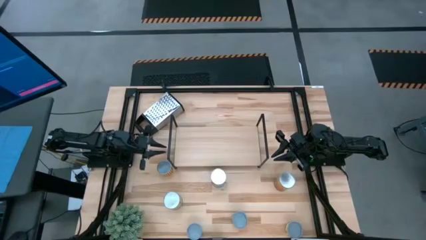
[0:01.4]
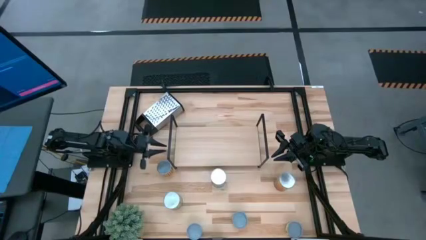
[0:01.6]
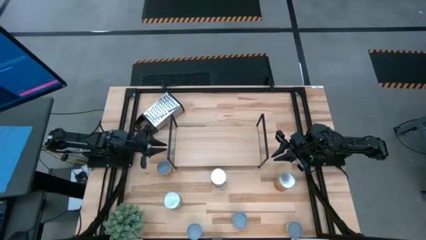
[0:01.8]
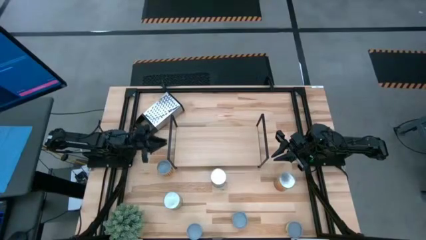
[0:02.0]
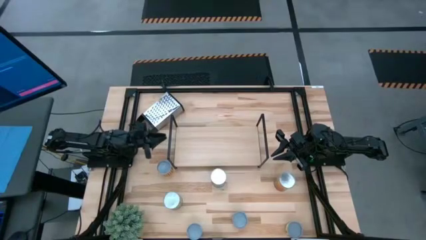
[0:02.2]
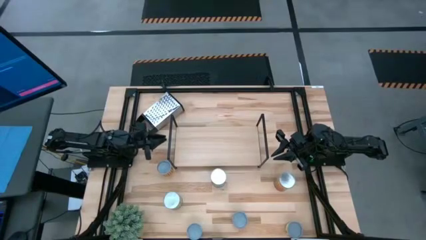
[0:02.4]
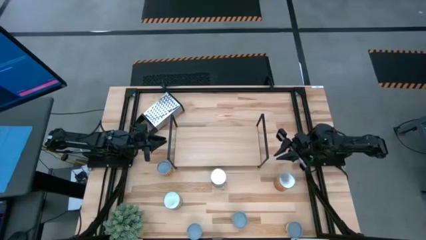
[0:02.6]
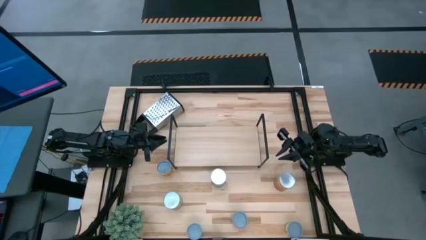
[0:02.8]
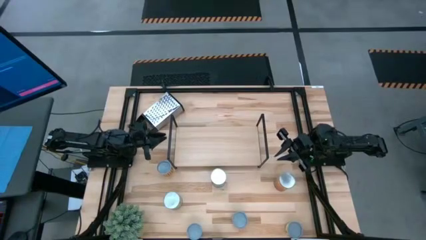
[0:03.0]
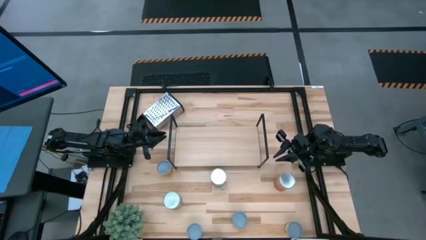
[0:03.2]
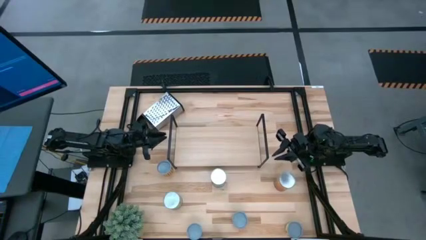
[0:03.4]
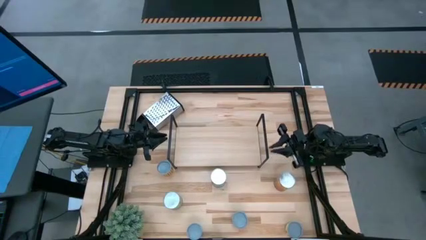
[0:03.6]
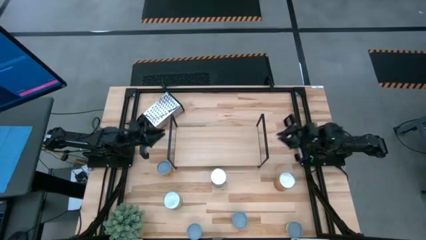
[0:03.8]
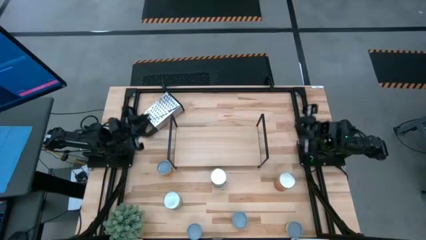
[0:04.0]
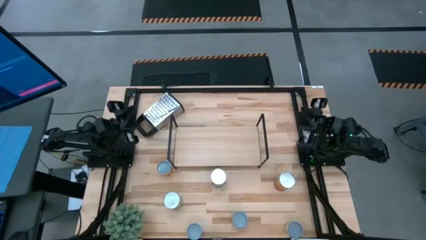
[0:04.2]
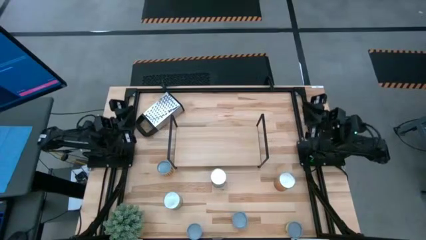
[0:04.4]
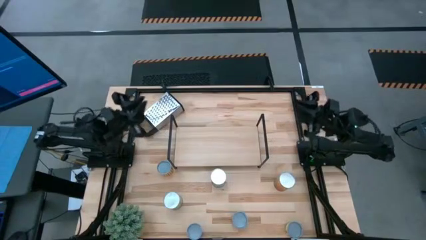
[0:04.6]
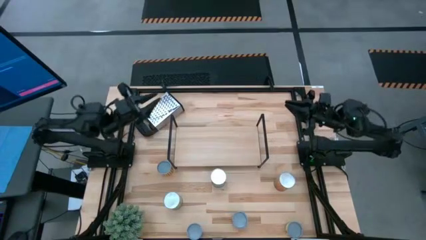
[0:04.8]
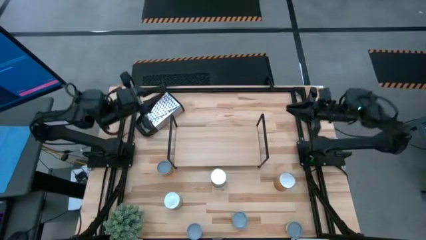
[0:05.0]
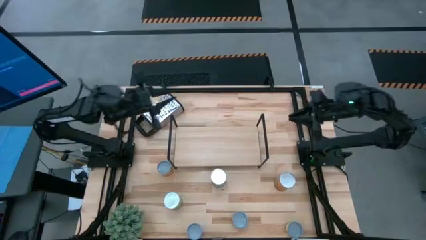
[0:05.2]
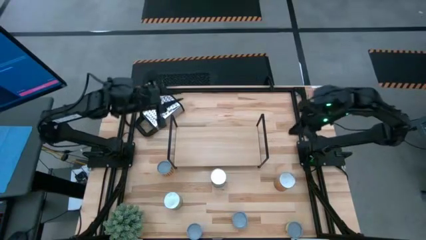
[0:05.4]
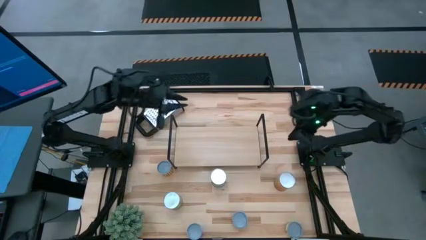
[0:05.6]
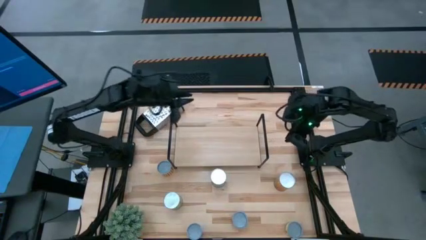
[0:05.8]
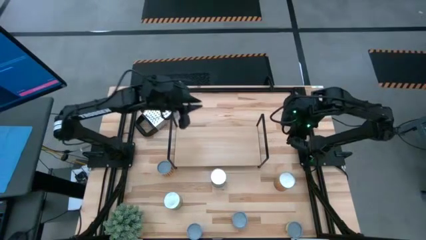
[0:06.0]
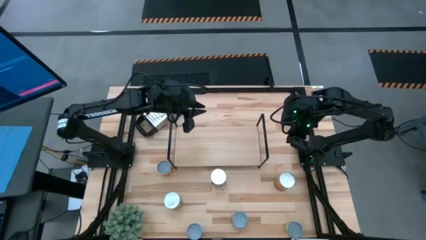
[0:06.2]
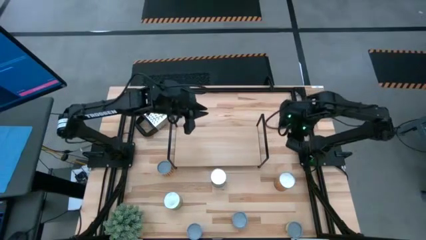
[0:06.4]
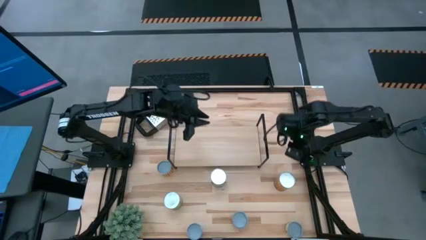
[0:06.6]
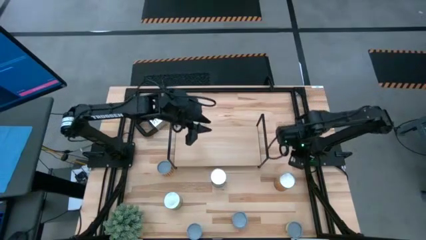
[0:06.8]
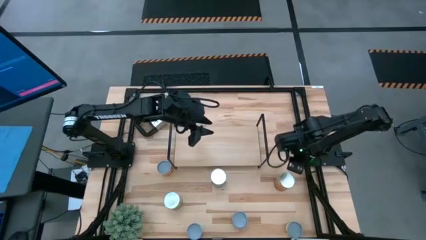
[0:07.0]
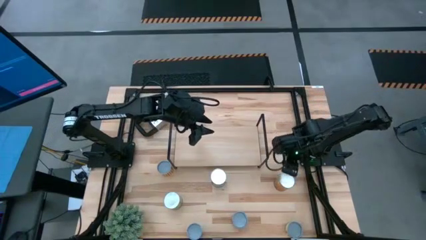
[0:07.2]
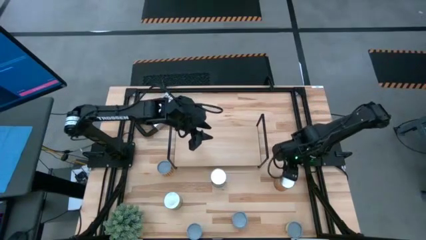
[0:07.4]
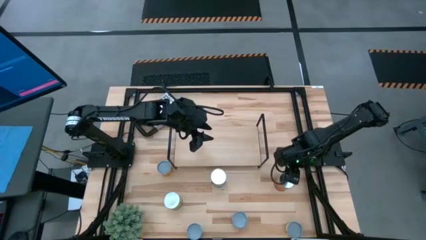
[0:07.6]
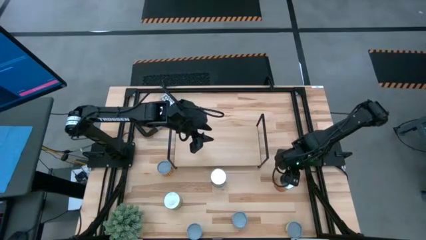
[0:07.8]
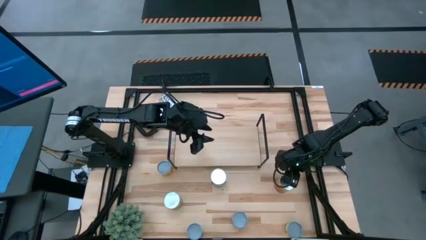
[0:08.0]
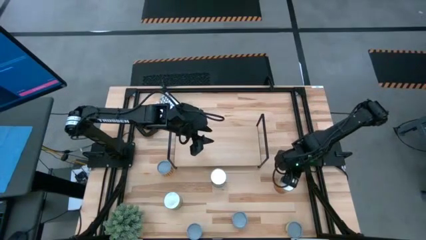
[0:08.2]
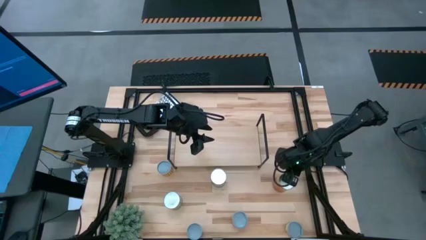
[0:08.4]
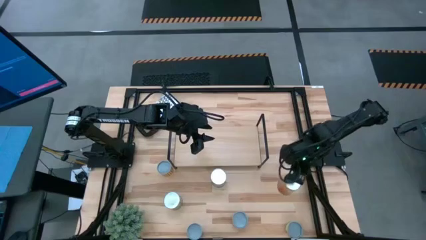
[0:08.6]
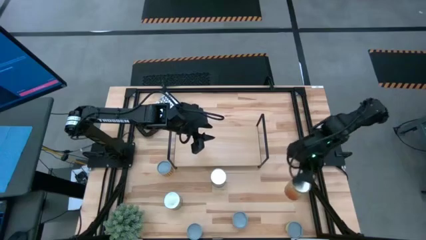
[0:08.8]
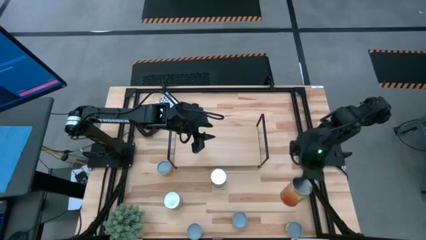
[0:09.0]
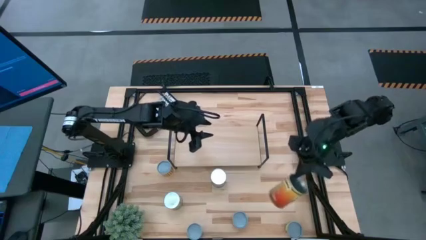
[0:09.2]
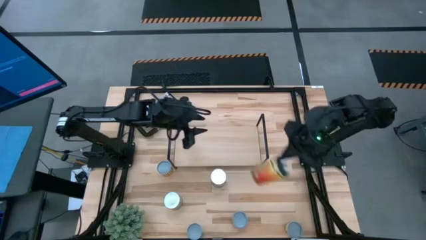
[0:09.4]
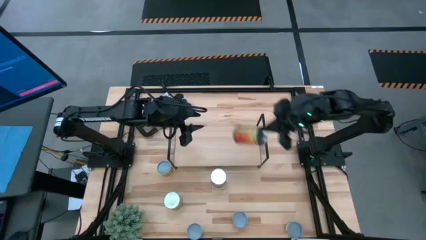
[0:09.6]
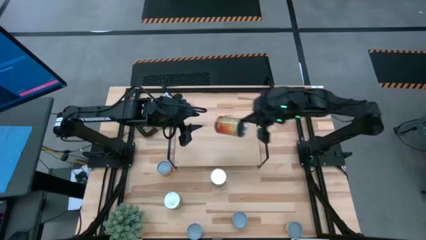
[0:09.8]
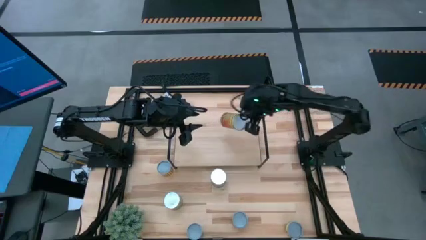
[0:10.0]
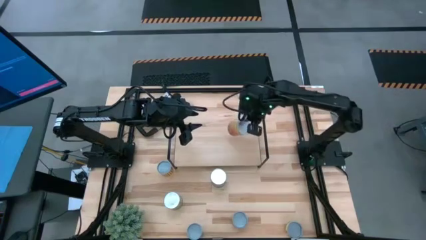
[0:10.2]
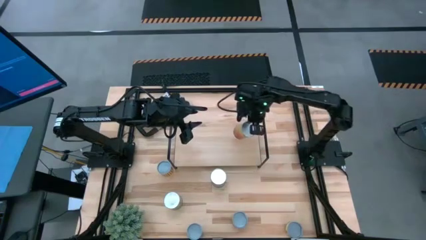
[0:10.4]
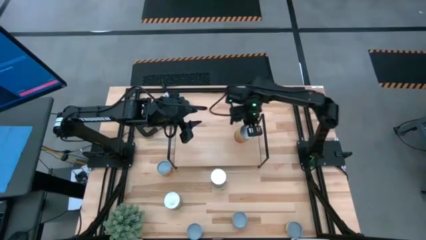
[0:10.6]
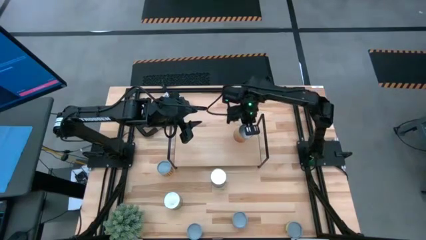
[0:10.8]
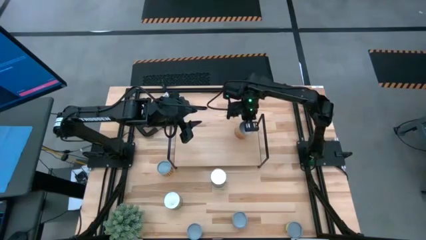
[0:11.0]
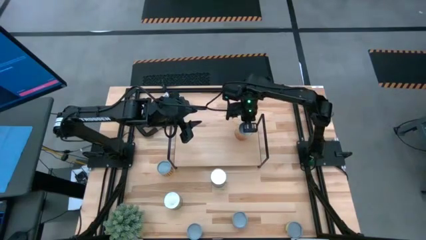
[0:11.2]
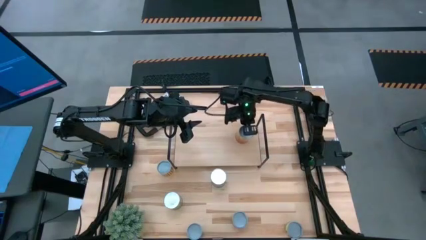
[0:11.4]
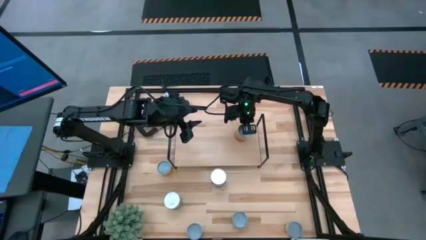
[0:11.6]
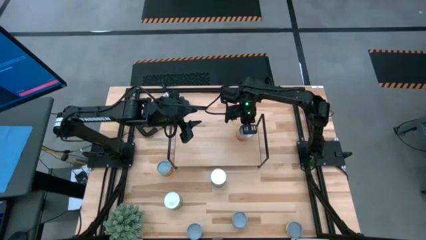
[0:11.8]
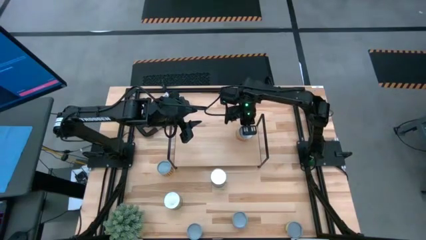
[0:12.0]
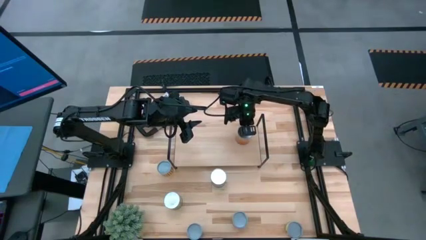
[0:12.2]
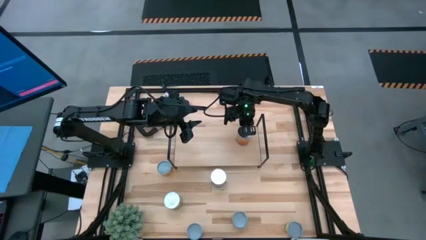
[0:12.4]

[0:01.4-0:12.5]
Task: Pick and place cans onto a shelf
Put the canned green beans on the shelf

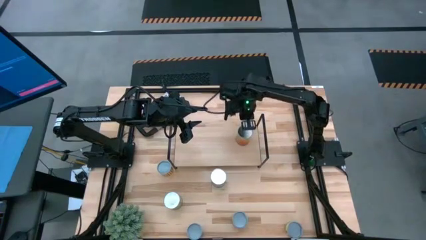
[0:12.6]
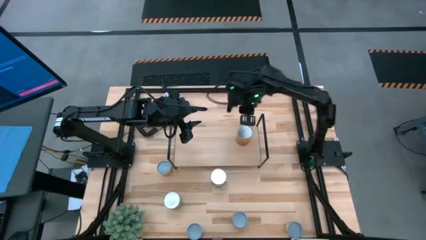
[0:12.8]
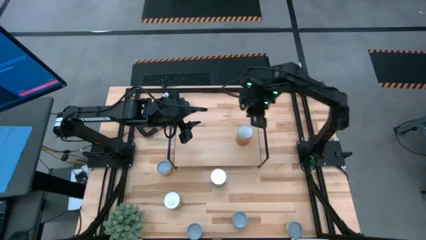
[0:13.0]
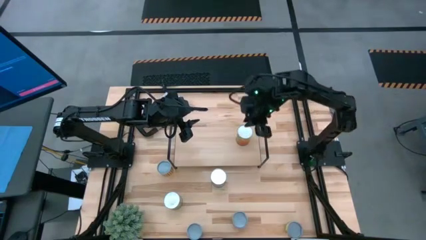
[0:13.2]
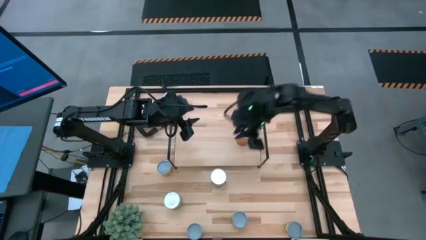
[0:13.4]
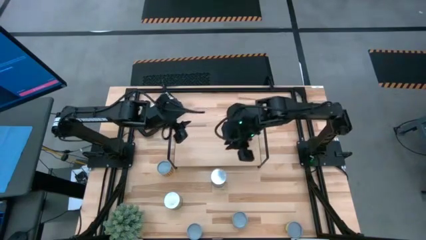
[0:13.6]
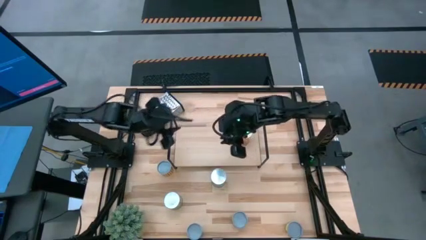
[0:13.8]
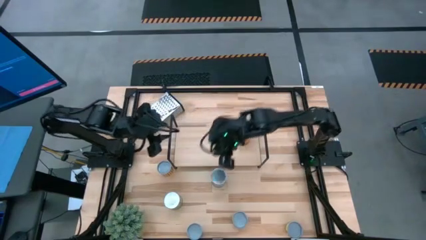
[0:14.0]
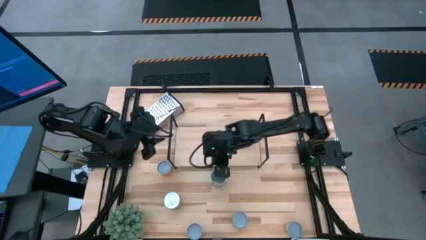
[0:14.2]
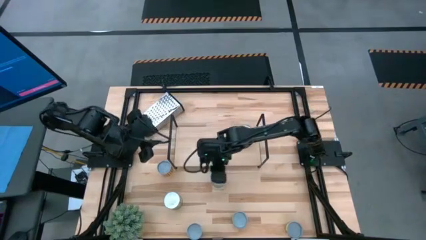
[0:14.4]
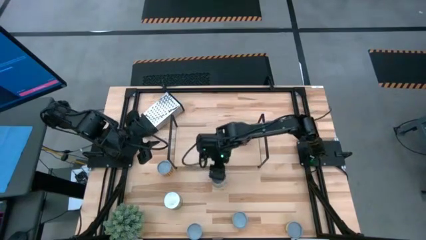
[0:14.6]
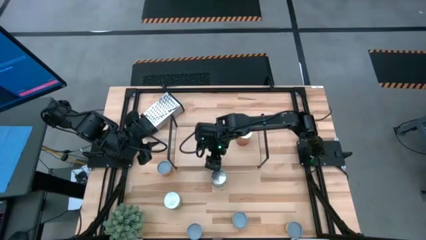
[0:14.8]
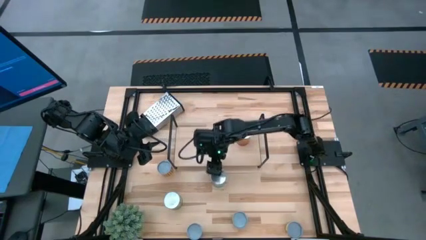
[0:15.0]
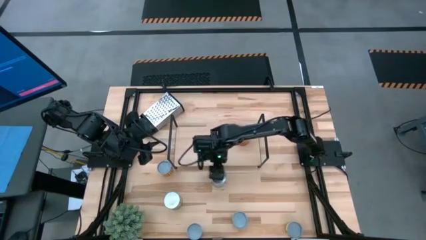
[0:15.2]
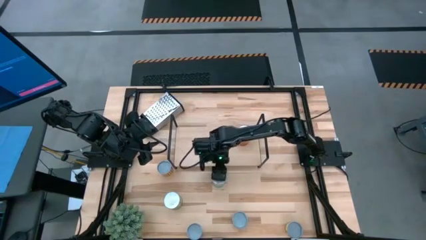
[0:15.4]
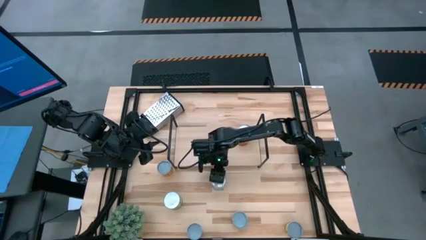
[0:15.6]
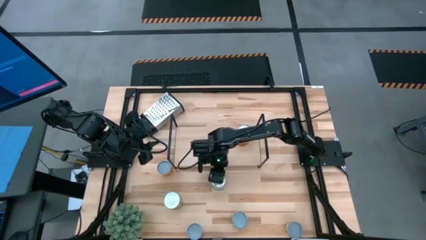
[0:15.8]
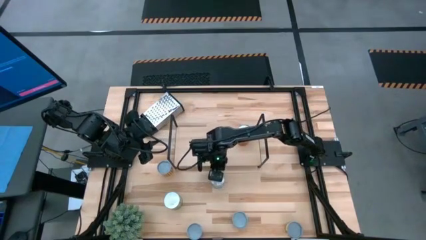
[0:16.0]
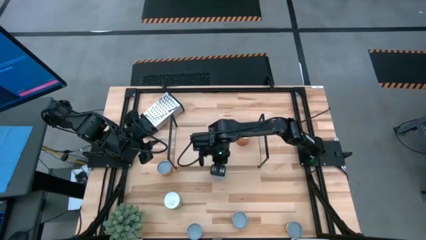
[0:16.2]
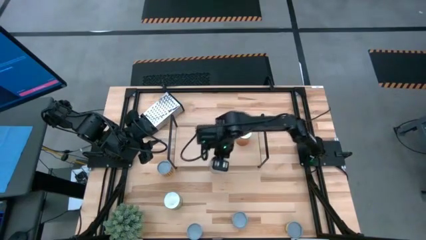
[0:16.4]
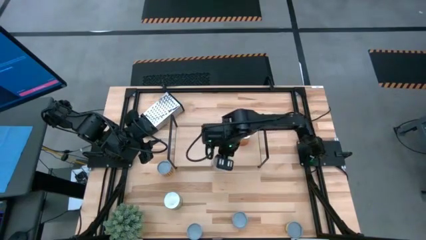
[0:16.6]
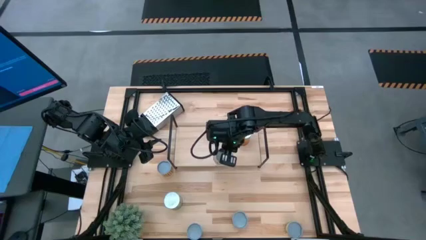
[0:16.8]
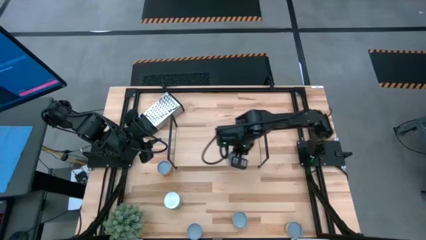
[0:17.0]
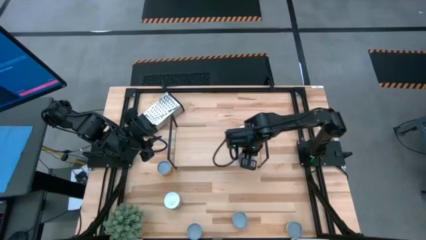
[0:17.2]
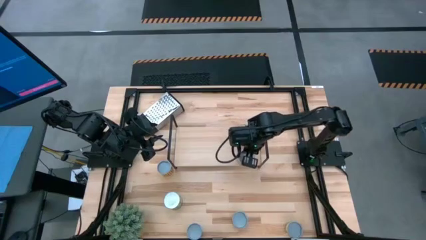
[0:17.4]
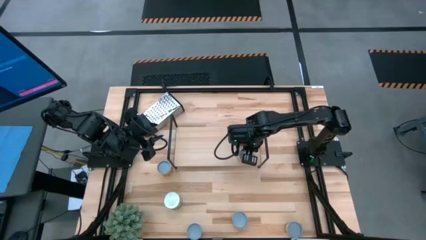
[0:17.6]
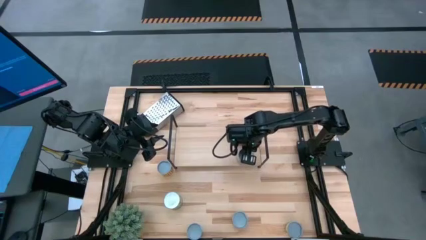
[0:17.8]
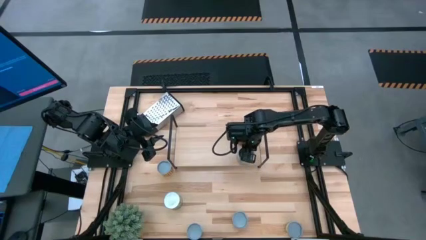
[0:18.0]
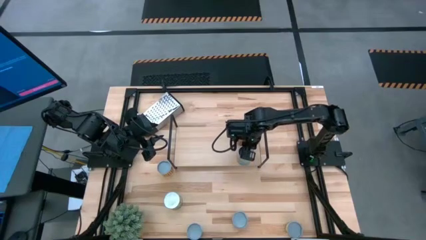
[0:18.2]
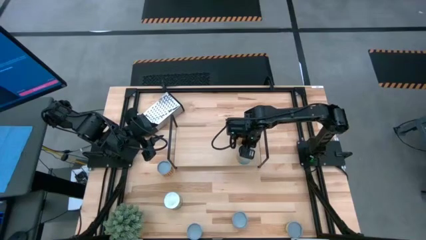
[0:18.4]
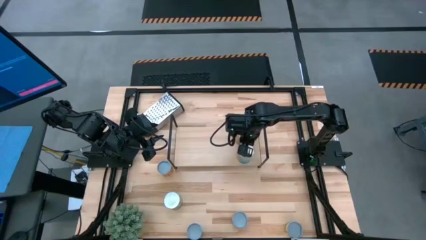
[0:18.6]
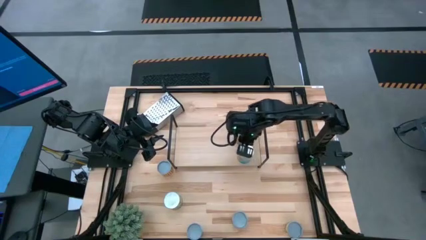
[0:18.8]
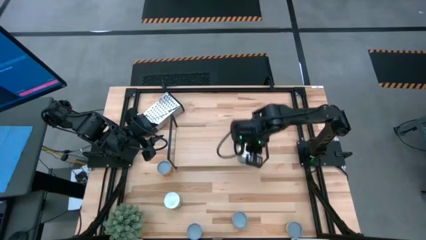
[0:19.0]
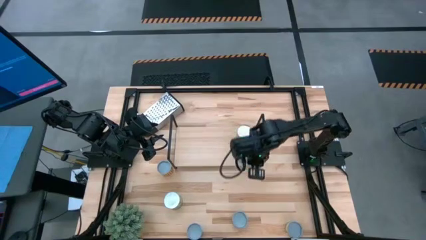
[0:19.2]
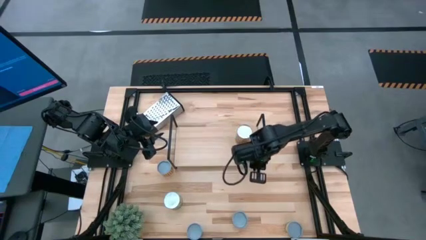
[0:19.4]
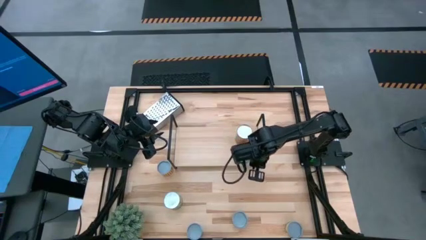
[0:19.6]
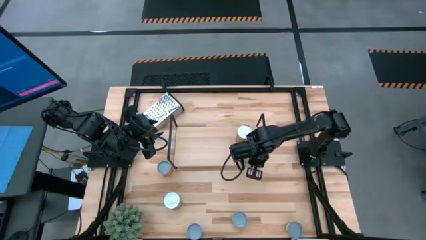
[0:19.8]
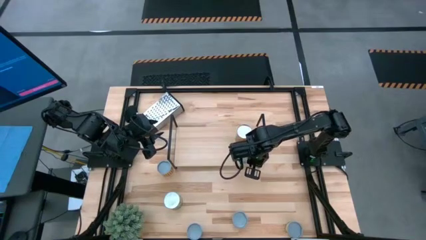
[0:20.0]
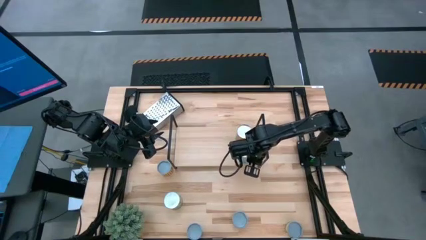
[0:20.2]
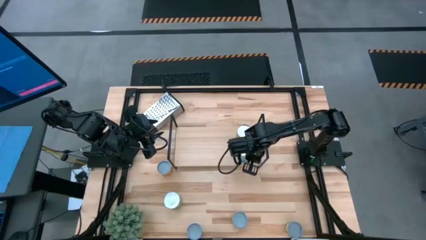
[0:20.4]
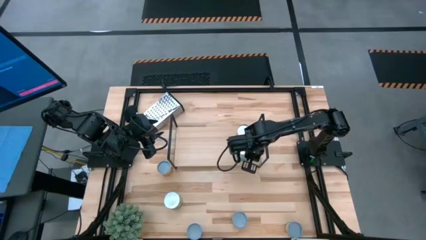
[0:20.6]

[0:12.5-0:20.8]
Put the canned tomatoes on the shelf
